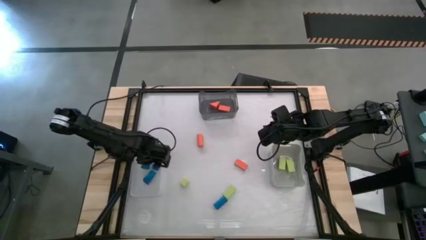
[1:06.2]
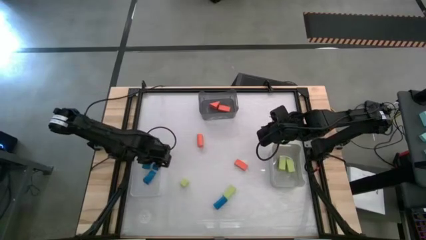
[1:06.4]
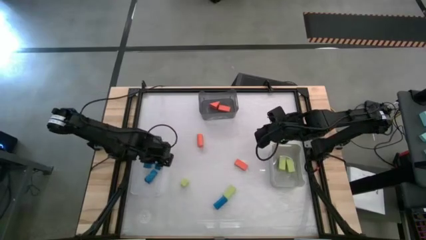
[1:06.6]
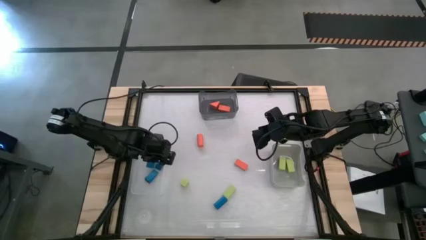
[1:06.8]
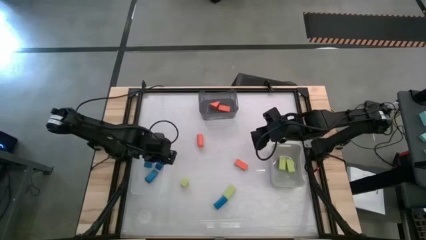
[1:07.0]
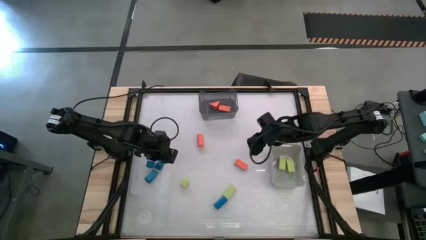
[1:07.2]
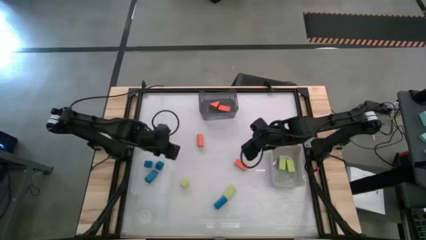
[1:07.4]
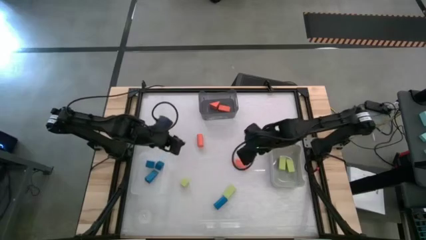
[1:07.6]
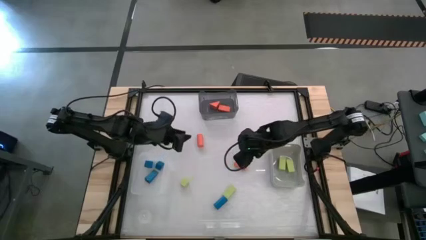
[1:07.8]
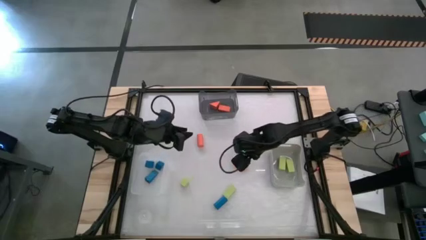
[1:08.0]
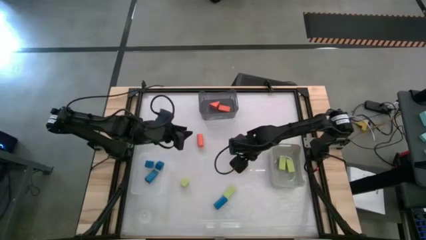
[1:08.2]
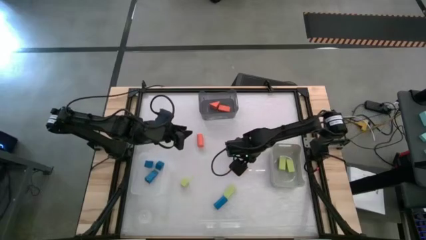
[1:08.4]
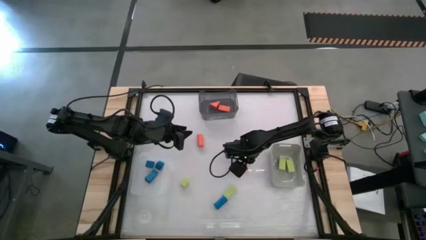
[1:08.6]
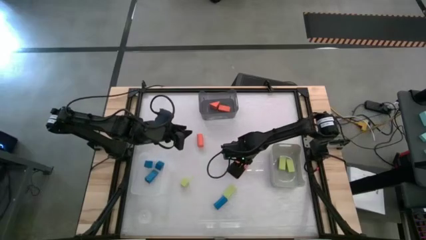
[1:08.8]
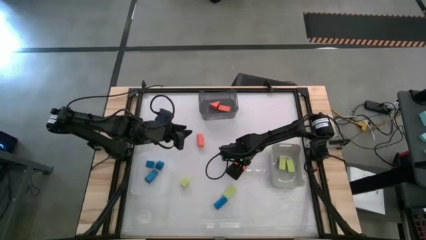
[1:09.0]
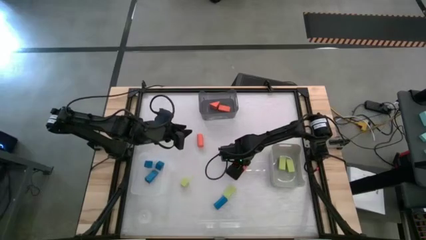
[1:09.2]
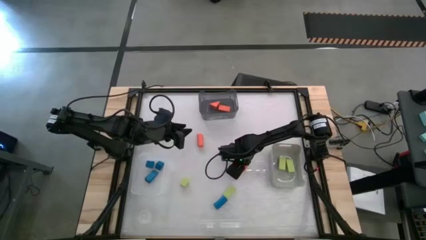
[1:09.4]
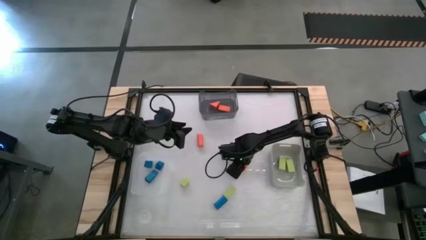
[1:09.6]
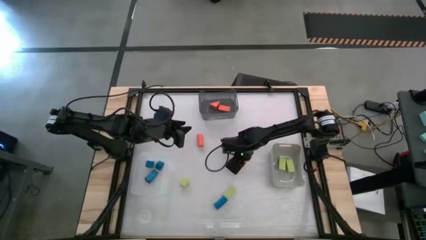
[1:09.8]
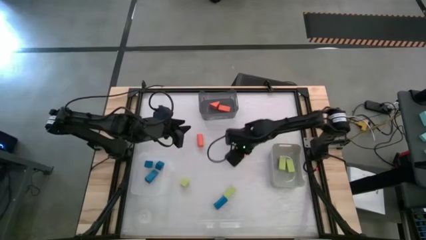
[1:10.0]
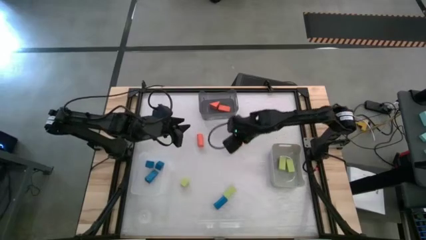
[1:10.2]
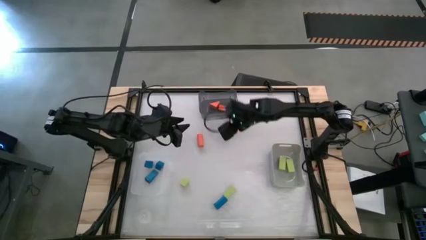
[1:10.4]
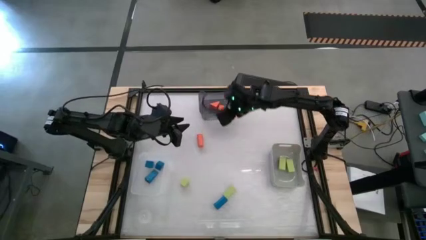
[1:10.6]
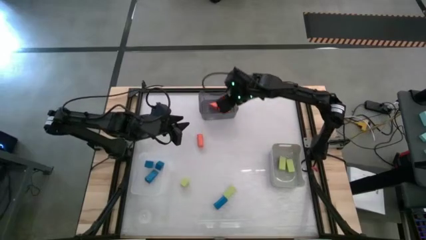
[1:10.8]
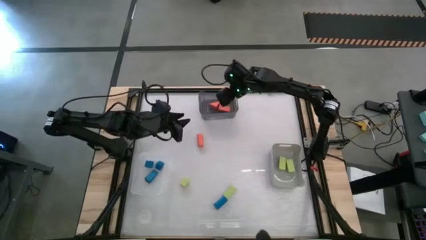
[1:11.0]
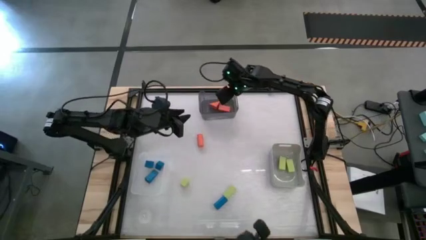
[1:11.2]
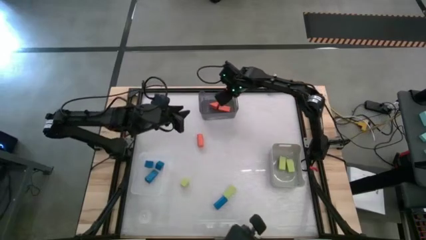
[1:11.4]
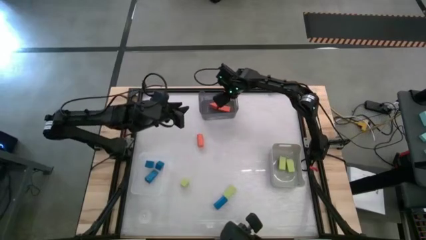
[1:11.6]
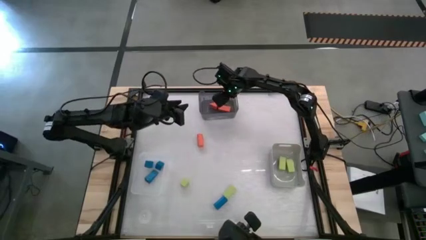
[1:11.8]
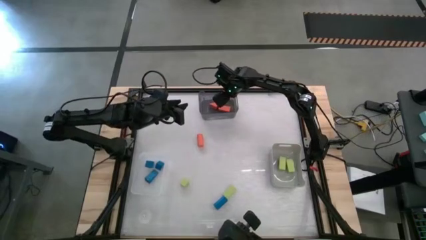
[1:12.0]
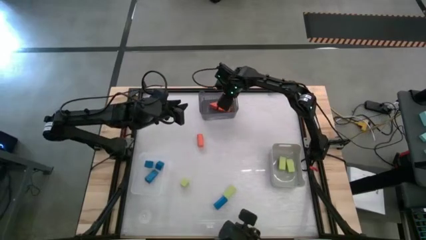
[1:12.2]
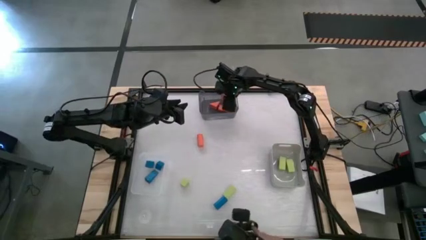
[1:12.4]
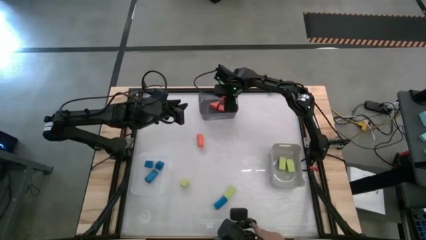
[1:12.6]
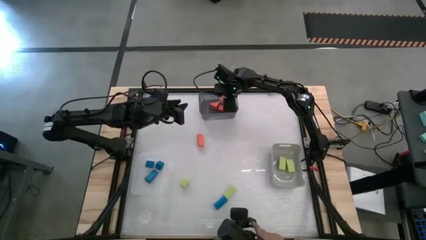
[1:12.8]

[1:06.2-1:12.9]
Task: Sort & place blocks by color
Put the orange block into the black bin

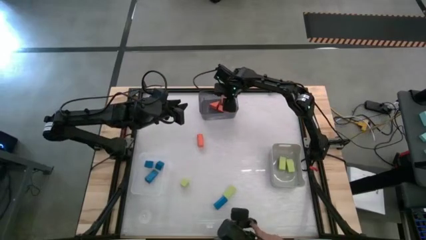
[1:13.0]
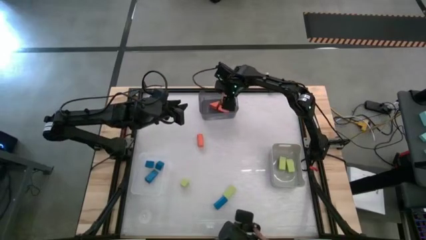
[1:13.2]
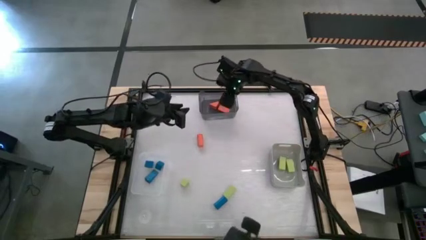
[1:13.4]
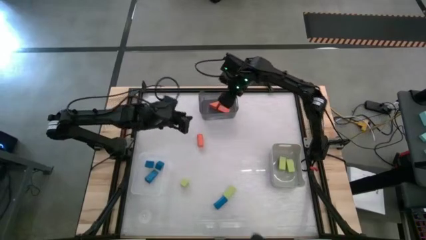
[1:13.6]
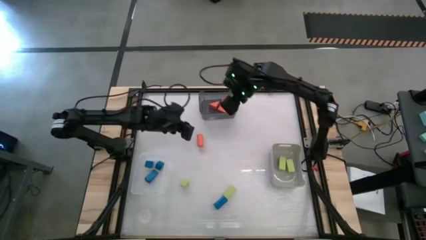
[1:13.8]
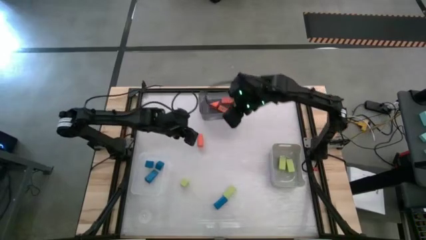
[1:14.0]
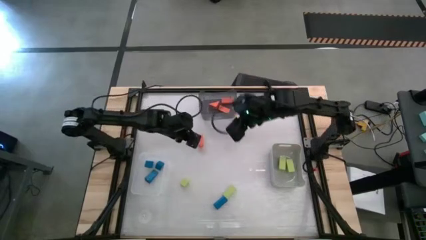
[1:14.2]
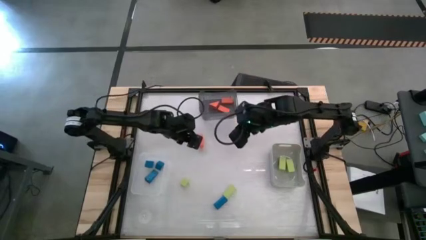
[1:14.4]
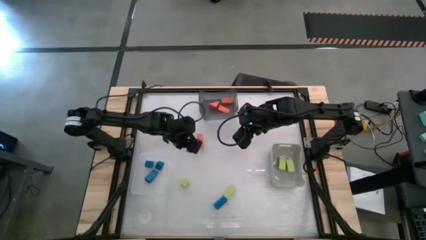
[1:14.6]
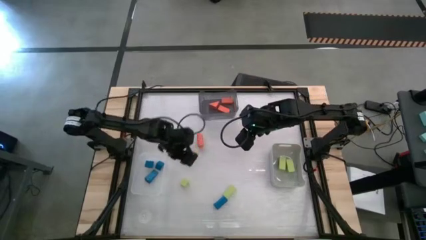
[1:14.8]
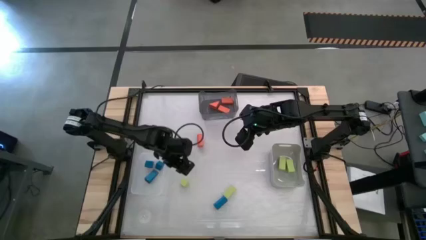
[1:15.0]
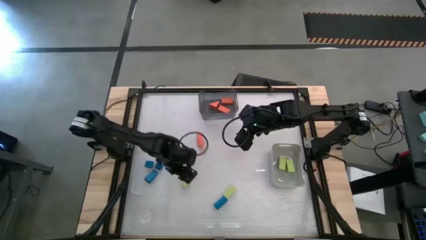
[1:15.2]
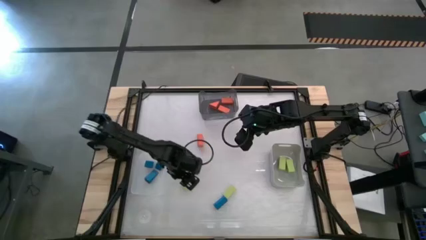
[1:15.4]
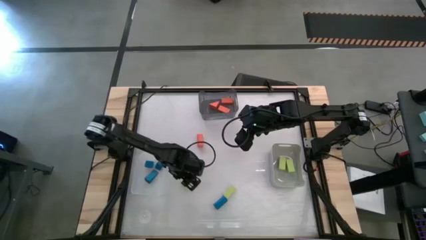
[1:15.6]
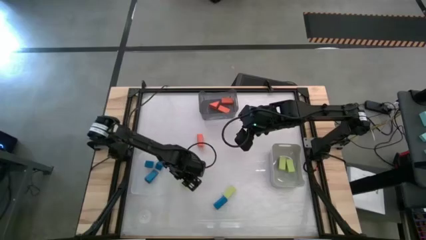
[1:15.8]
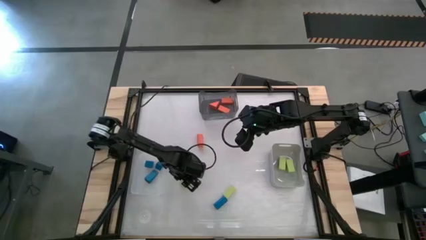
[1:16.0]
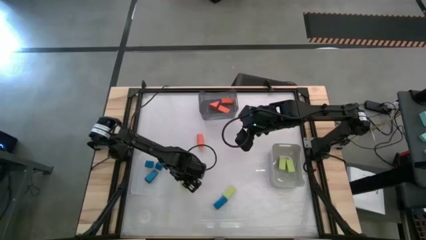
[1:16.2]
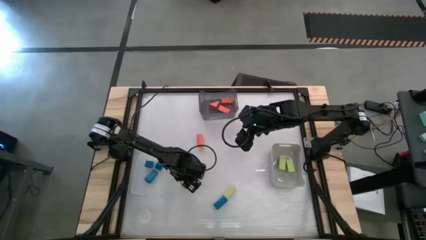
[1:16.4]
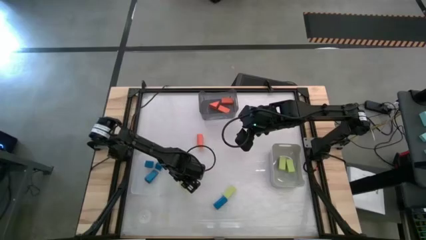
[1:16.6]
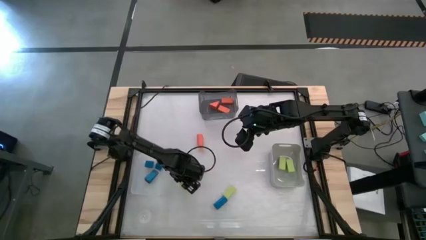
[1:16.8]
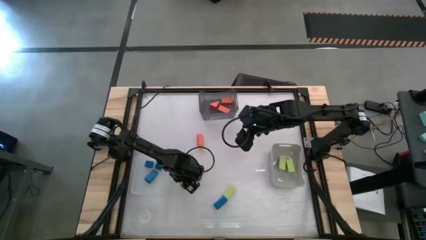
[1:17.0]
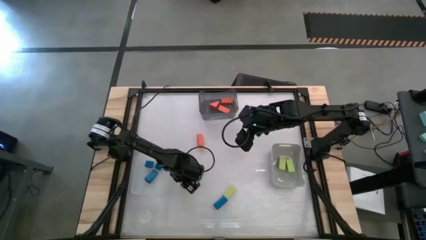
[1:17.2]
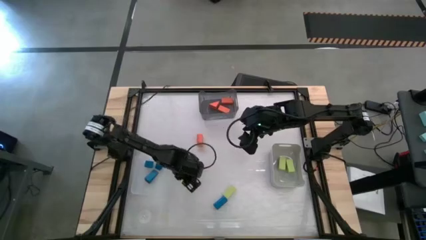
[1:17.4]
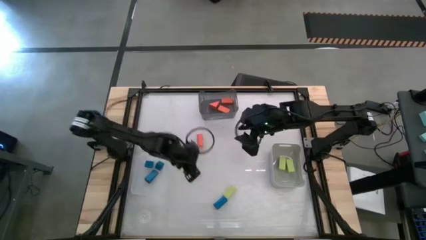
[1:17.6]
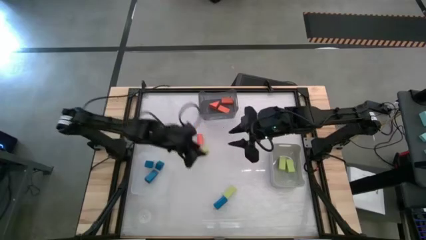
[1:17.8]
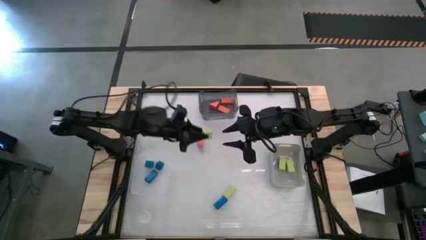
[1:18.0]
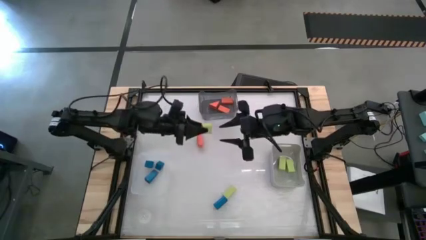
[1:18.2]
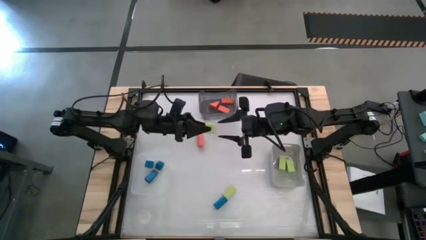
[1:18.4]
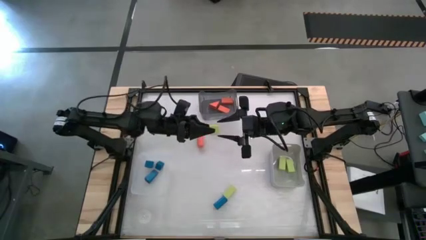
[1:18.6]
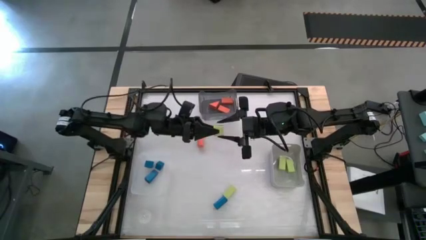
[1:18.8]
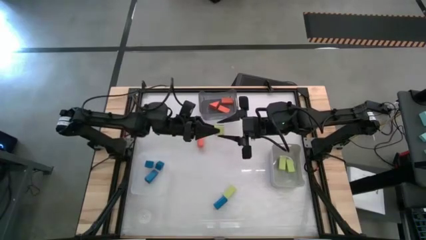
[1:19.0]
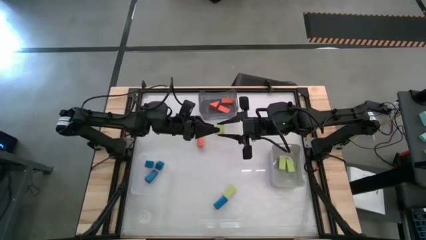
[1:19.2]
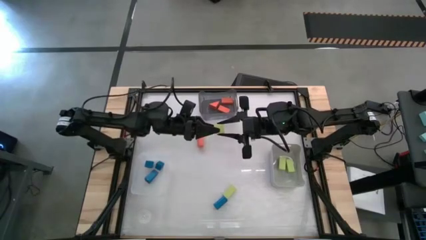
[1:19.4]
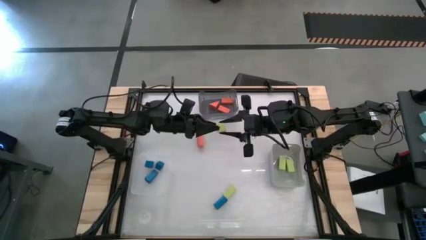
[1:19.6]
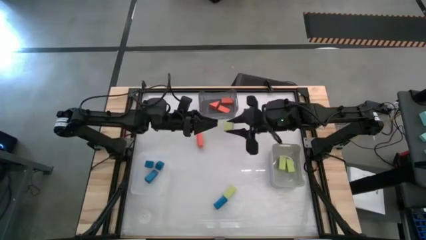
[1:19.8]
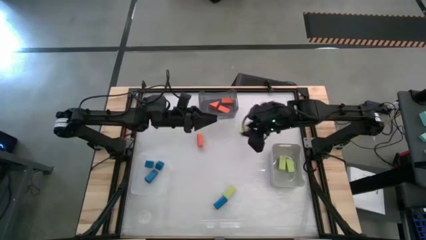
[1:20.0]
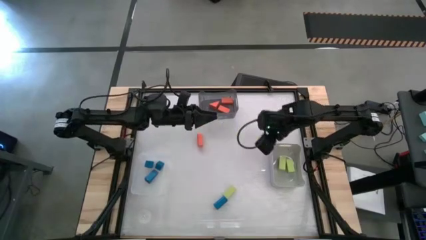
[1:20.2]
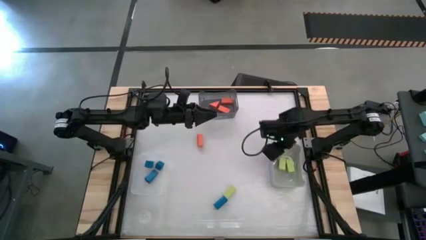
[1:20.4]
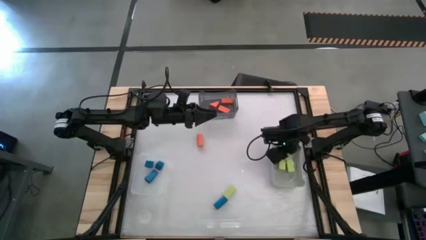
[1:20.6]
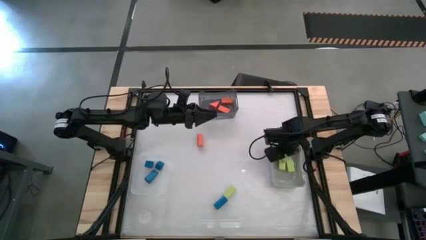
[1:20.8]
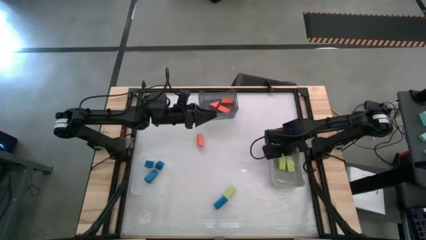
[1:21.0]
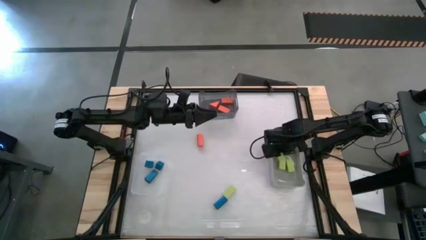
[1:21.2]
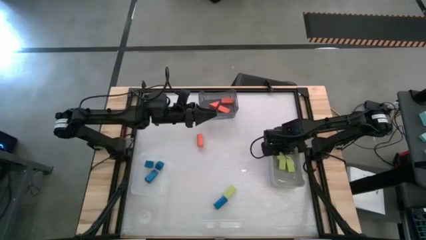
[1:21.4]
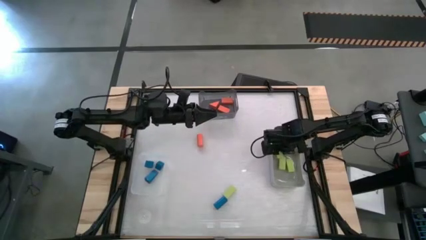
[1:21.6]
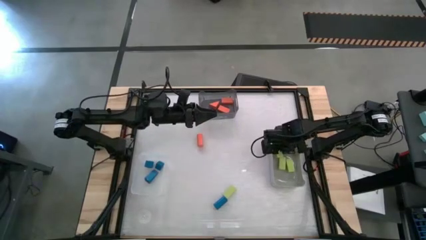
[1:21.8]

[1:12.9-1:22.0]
Put the green block into the gray bin
